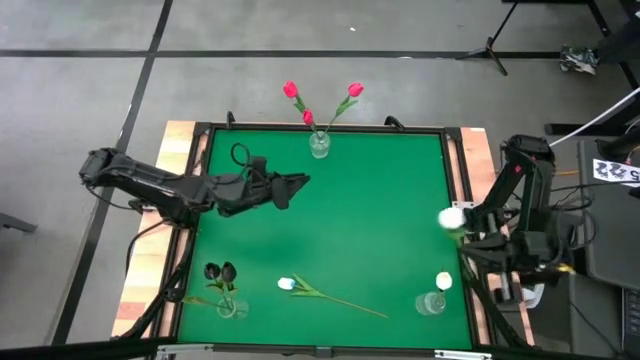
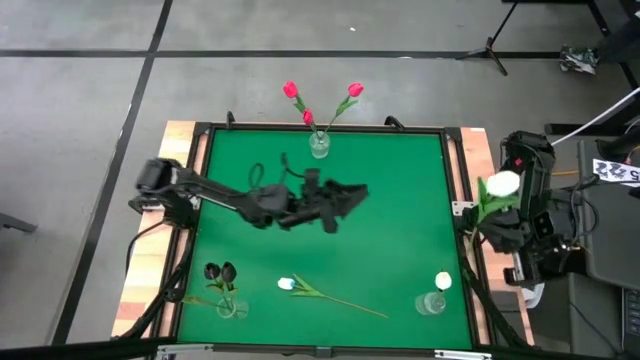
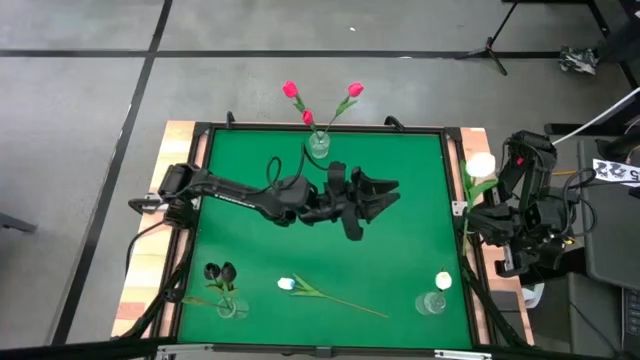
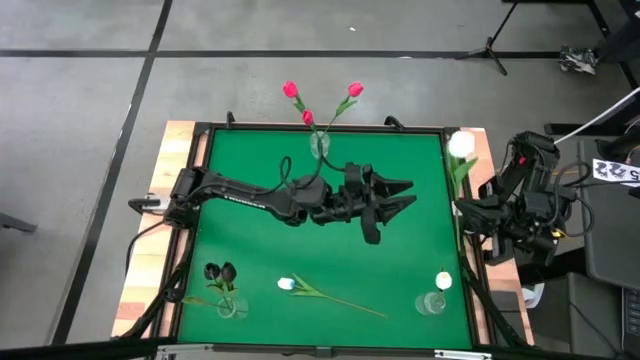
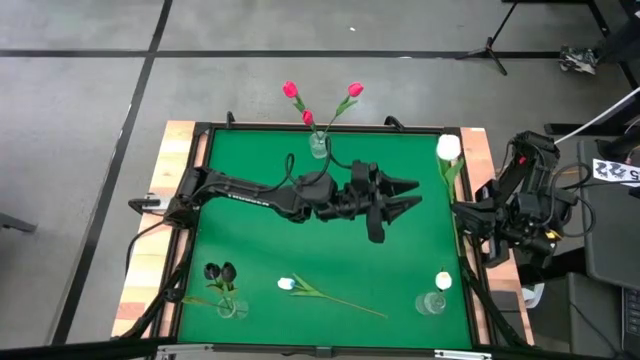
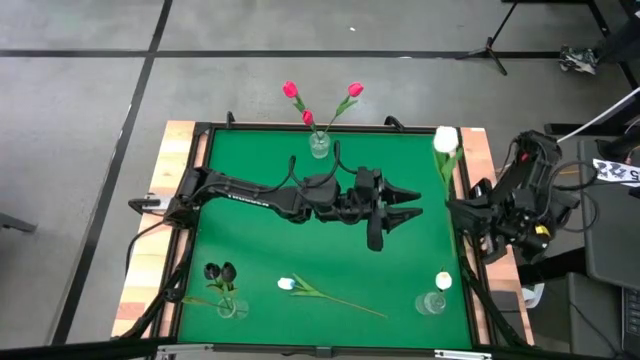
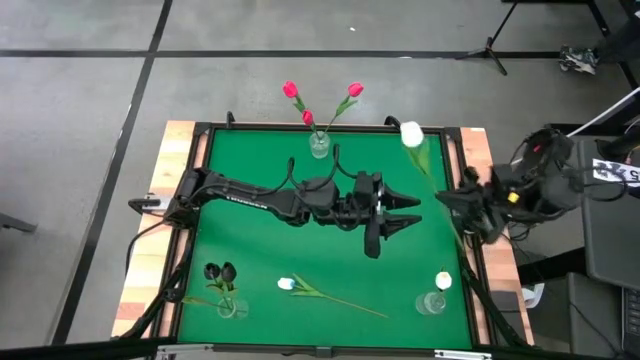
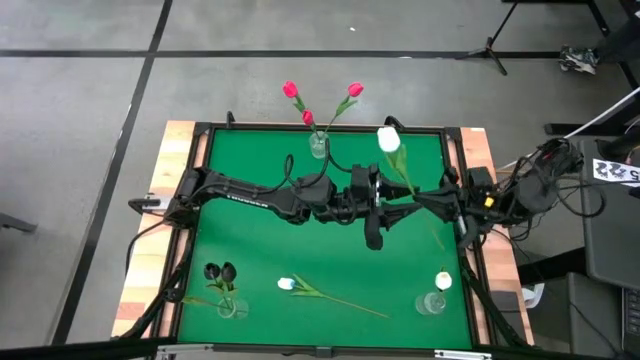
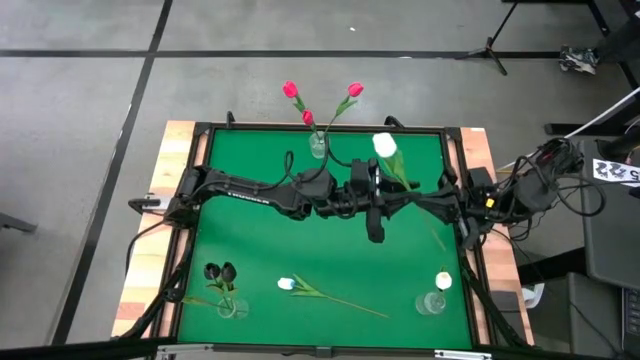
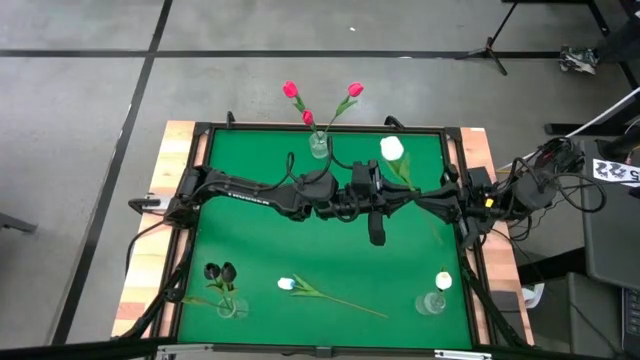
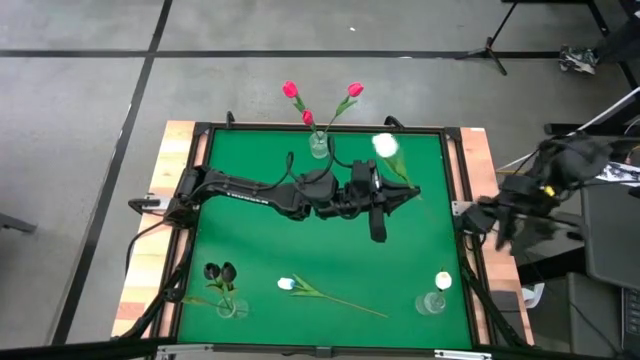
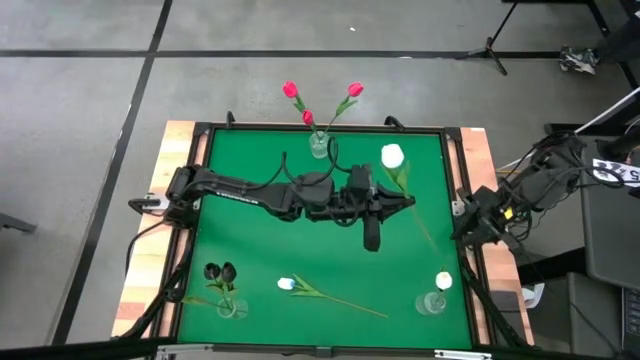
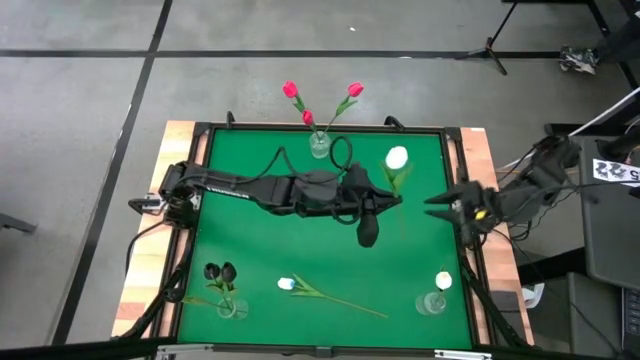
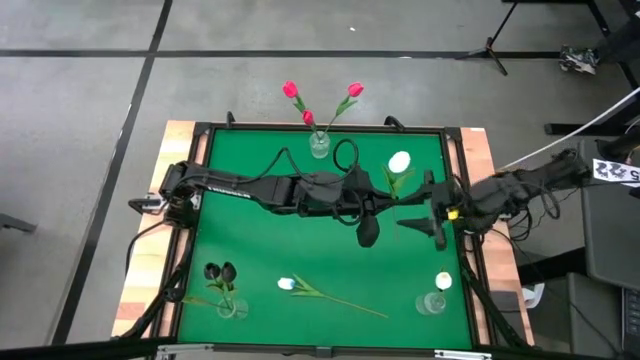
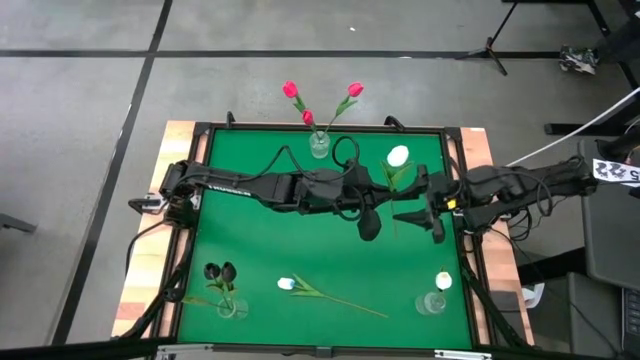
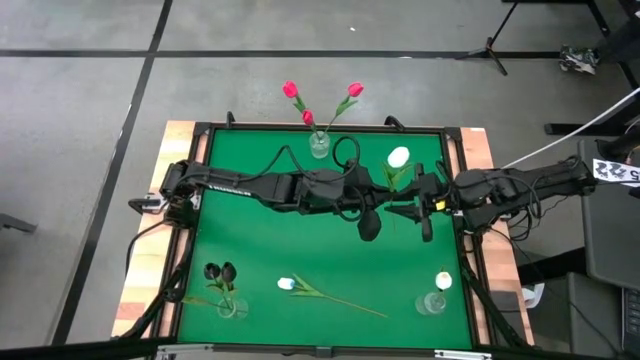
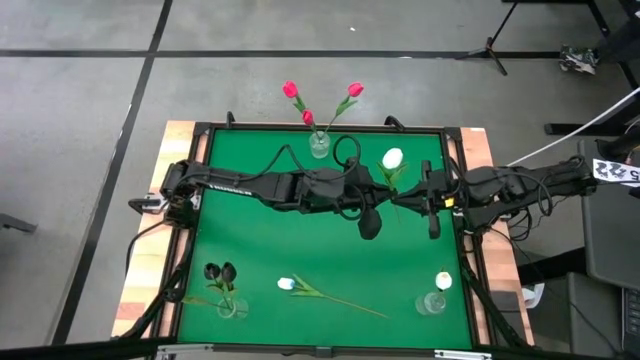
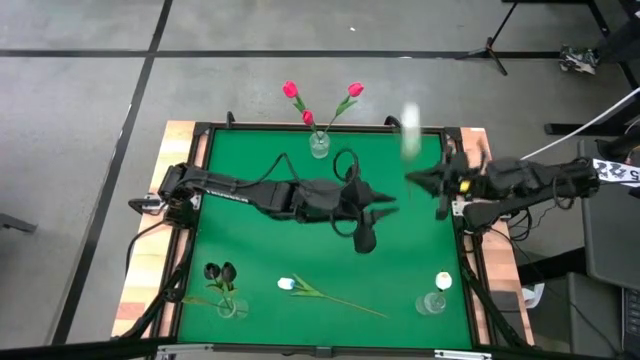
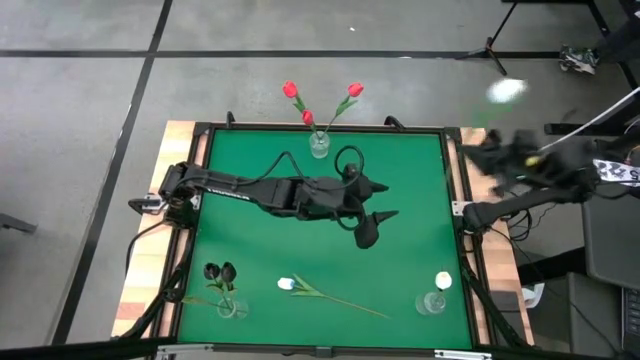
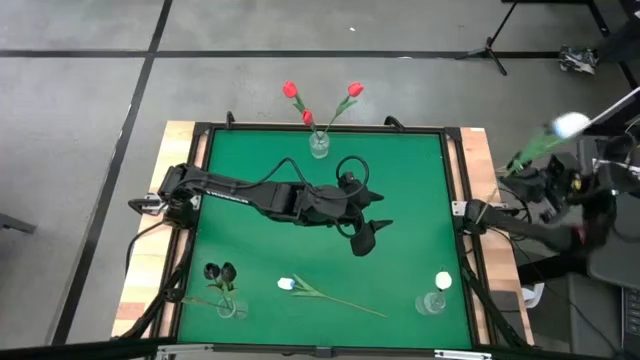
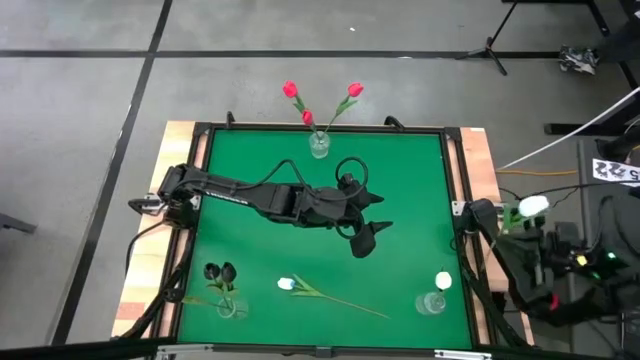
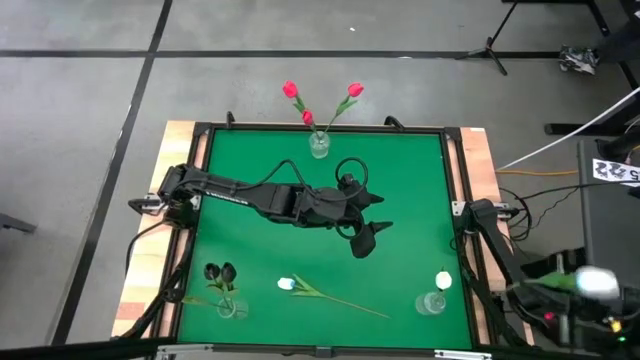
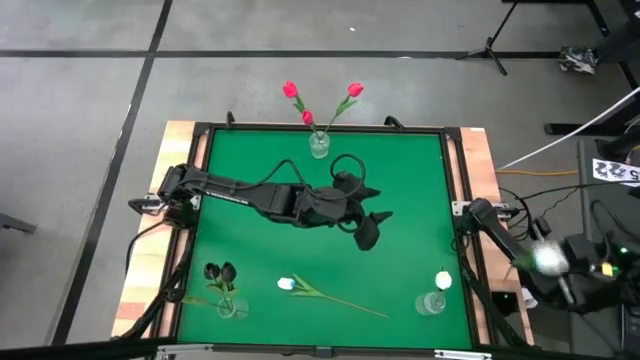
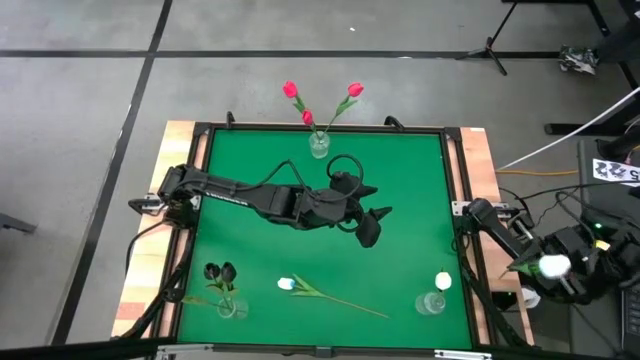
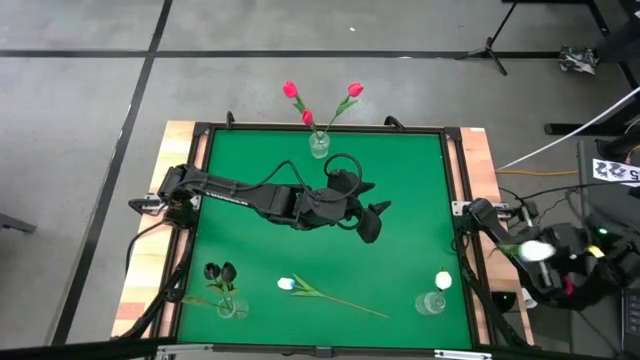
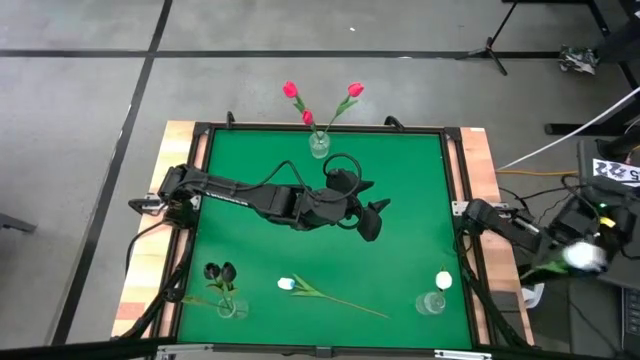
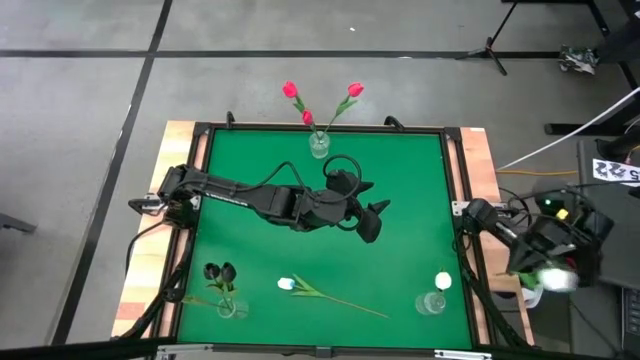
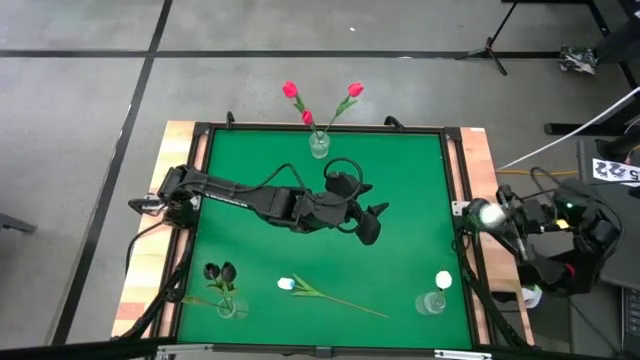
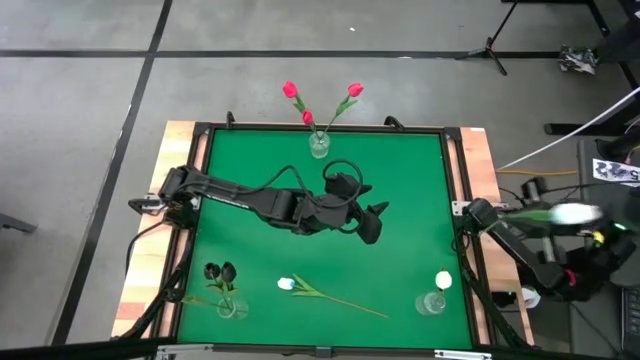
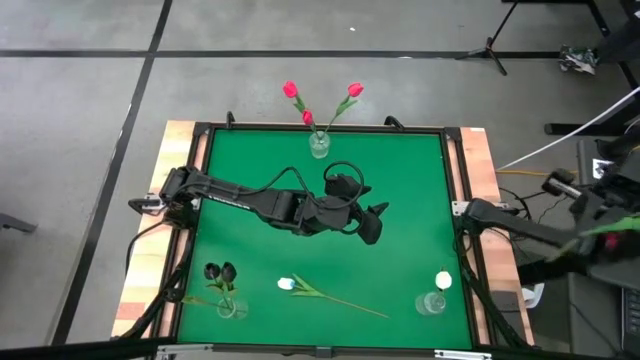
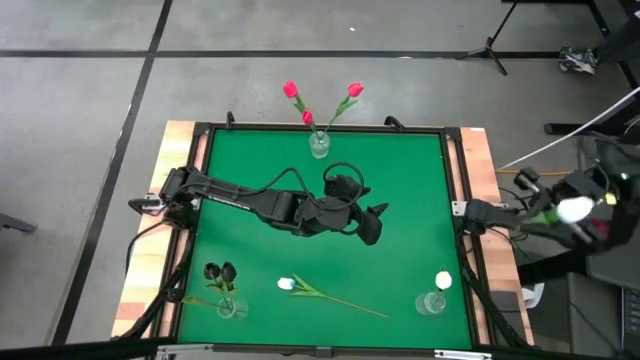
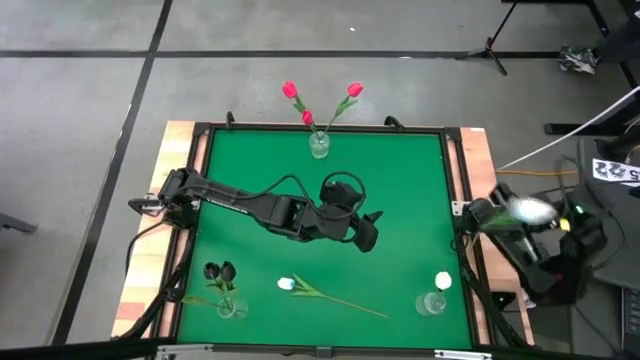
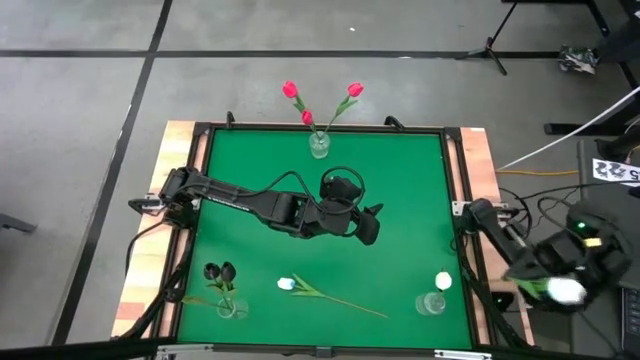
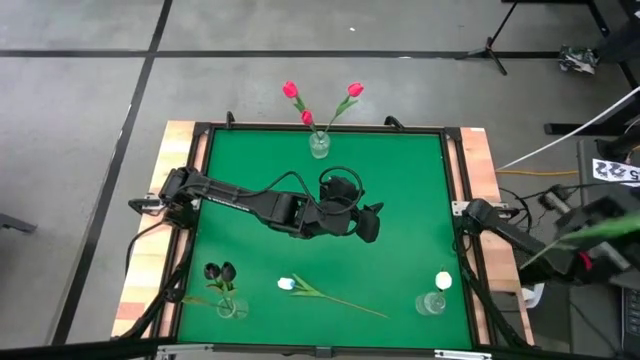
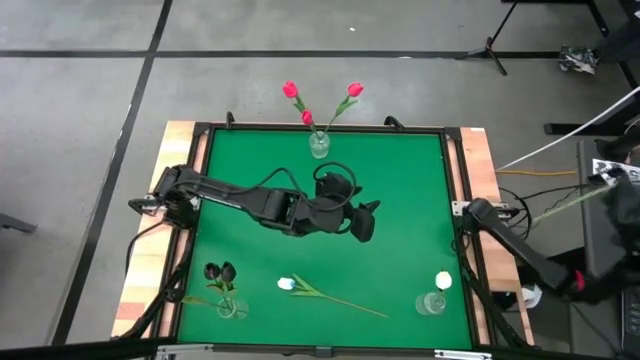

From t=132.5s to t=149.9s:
Task: Sort flowers into vase by color
Put the top white flower into the bottom right transparent vase

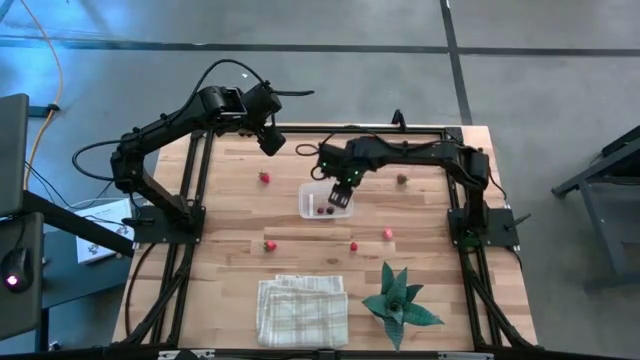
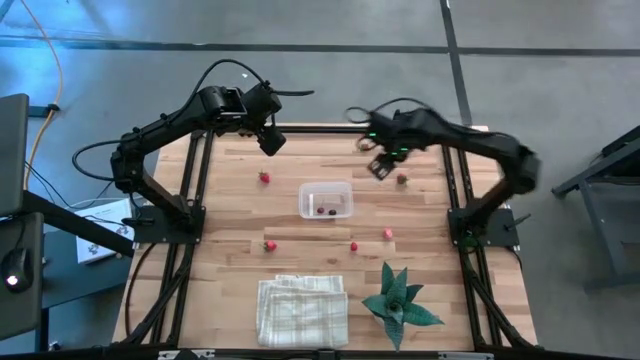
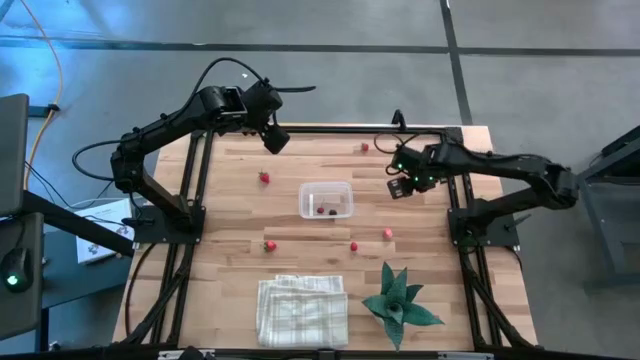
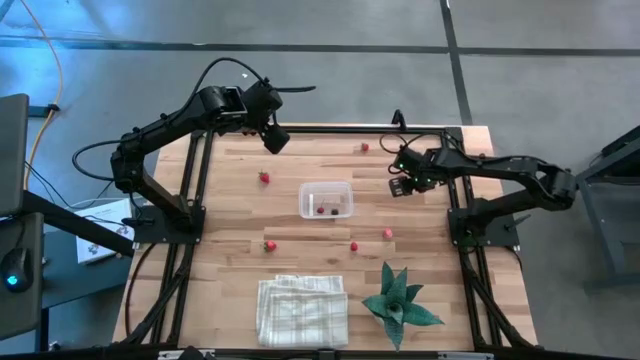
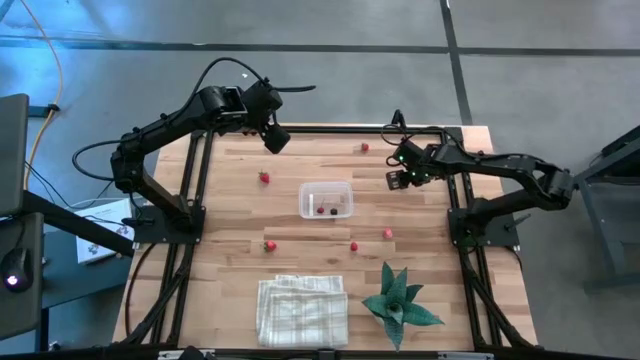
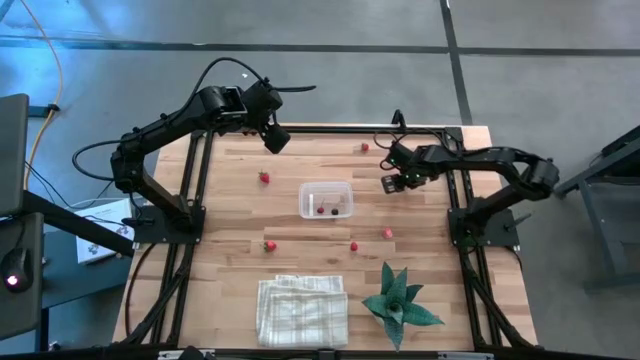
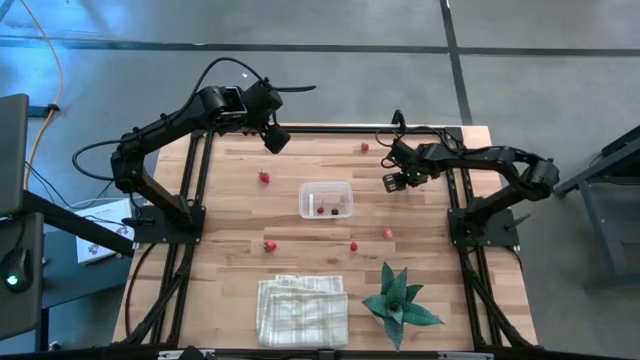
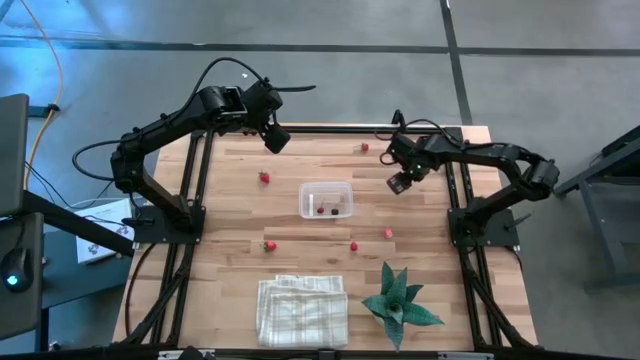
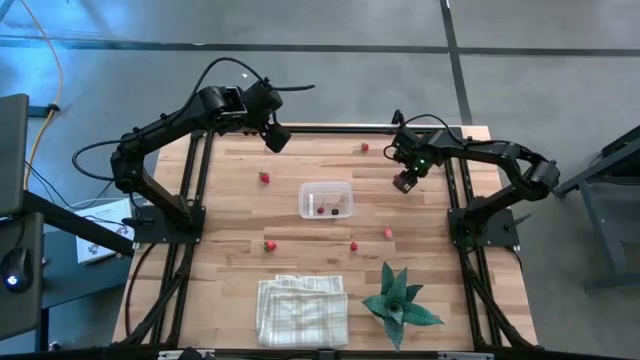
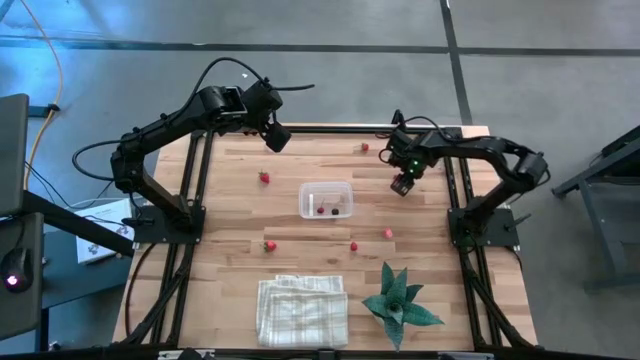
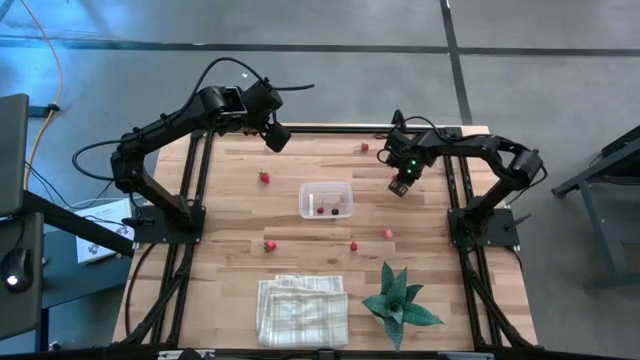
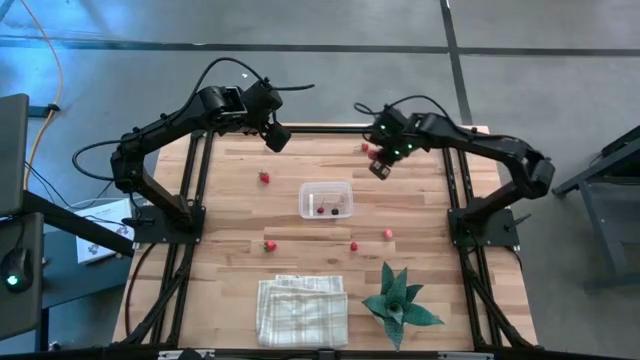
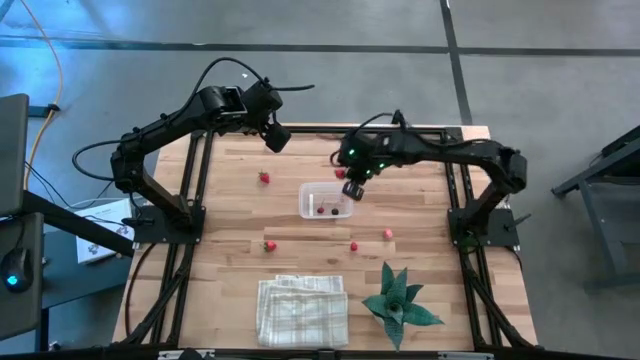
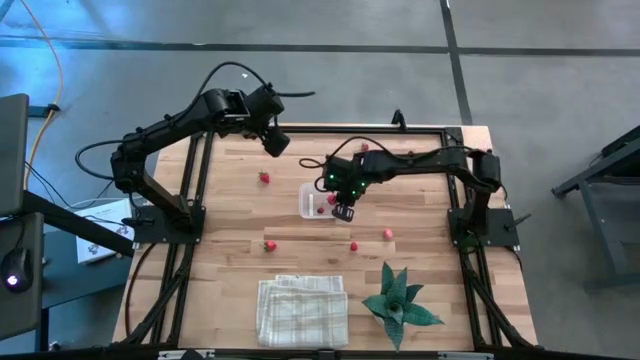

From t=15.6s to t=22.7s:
Task: Pick and placing Produce into tupperware
Put the top right red strawberry into the transparent bin
